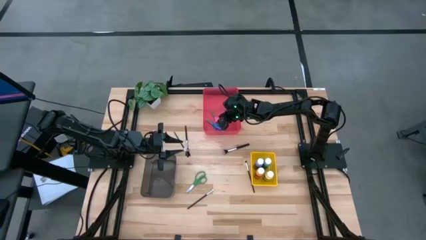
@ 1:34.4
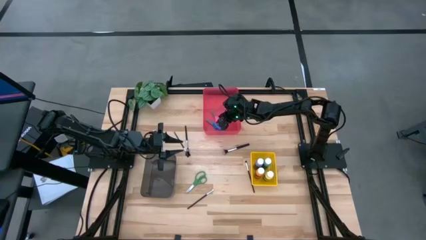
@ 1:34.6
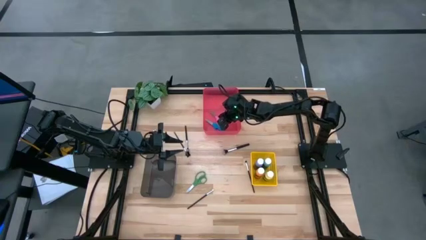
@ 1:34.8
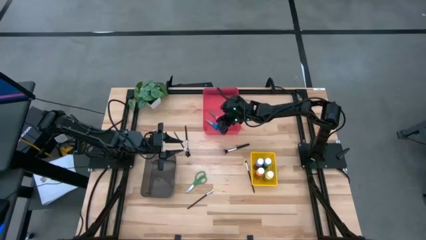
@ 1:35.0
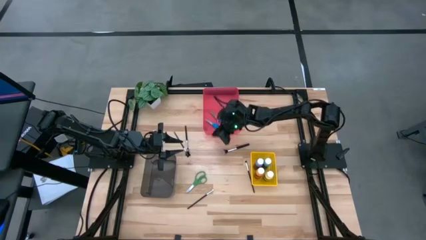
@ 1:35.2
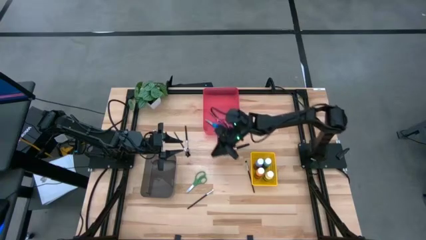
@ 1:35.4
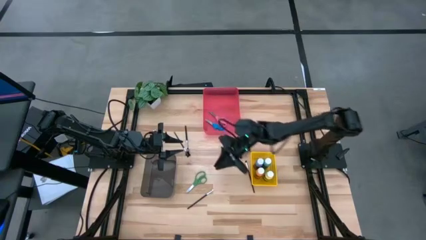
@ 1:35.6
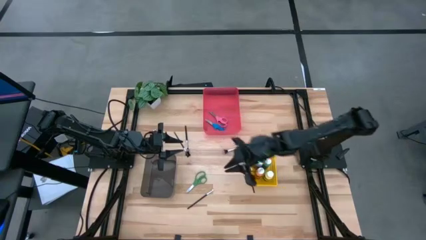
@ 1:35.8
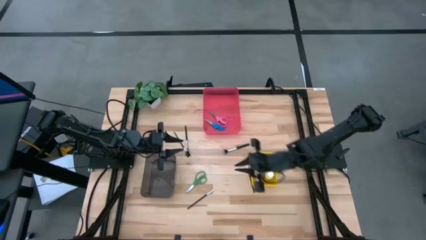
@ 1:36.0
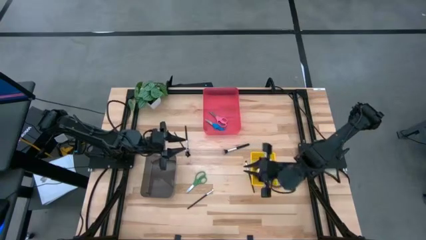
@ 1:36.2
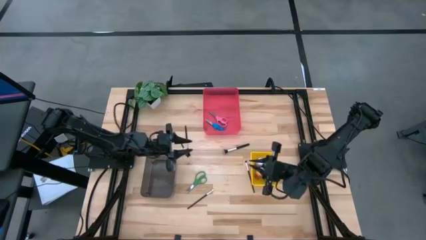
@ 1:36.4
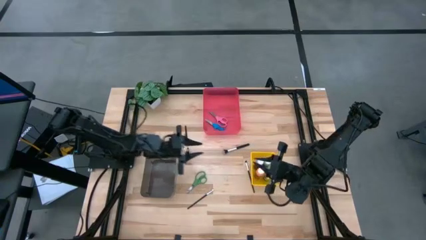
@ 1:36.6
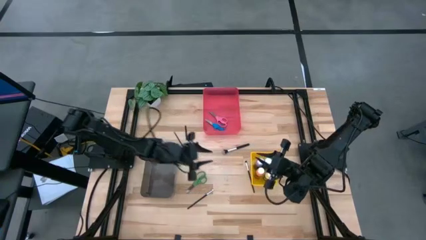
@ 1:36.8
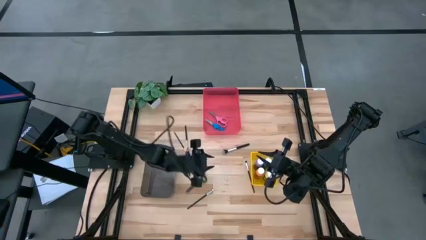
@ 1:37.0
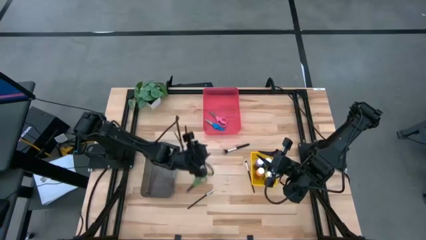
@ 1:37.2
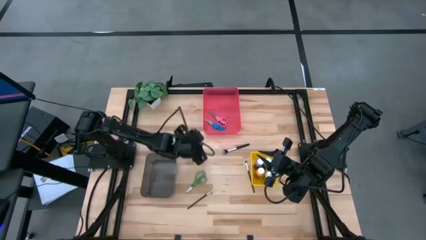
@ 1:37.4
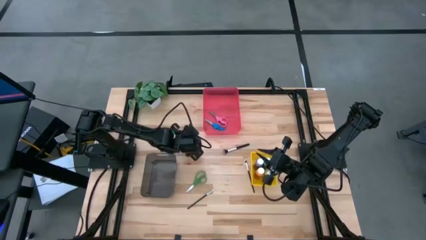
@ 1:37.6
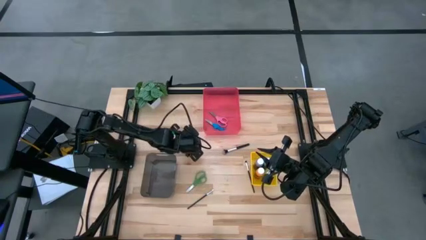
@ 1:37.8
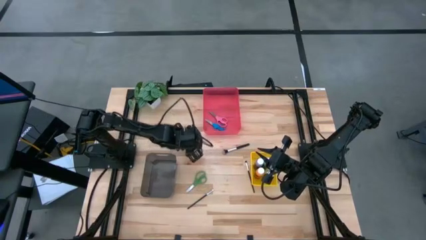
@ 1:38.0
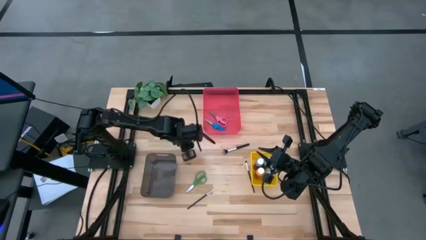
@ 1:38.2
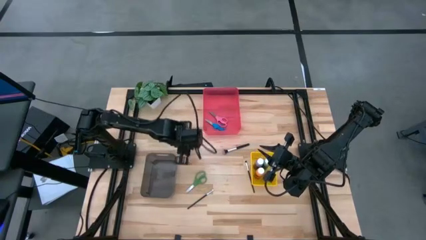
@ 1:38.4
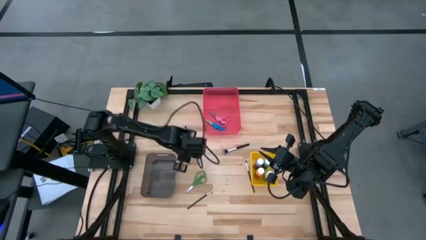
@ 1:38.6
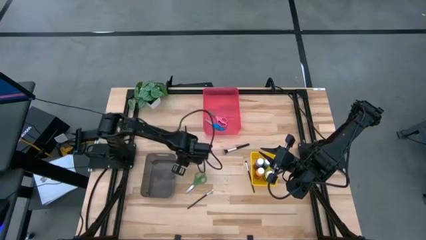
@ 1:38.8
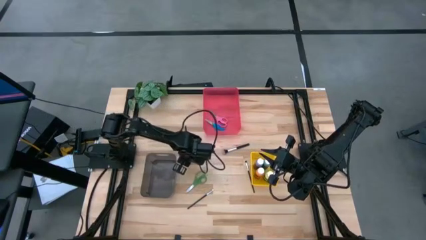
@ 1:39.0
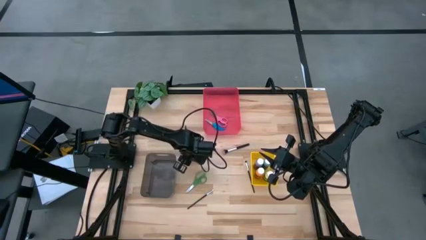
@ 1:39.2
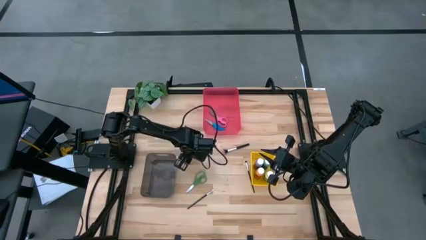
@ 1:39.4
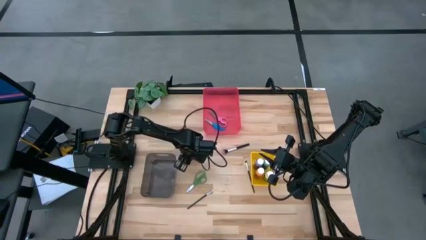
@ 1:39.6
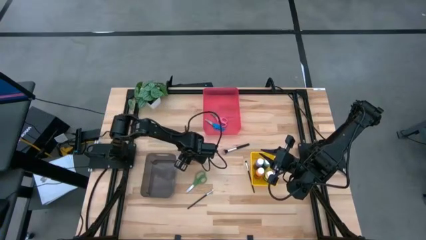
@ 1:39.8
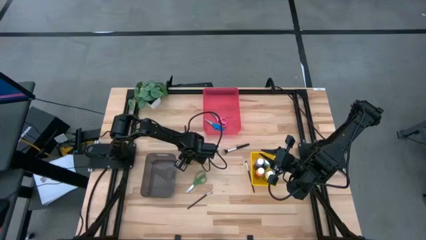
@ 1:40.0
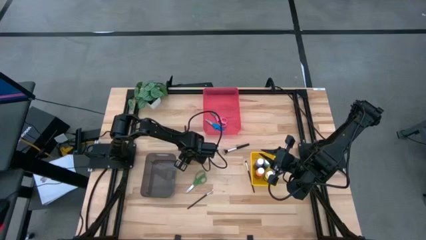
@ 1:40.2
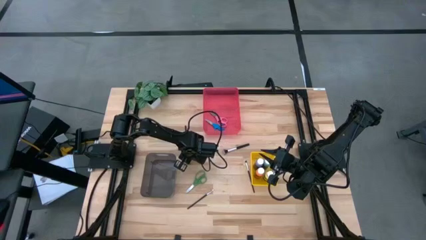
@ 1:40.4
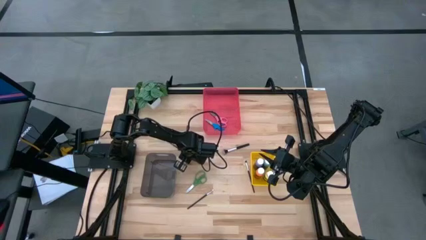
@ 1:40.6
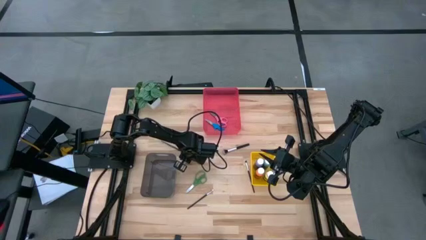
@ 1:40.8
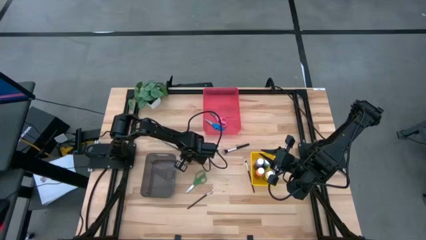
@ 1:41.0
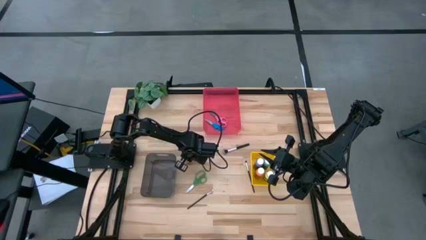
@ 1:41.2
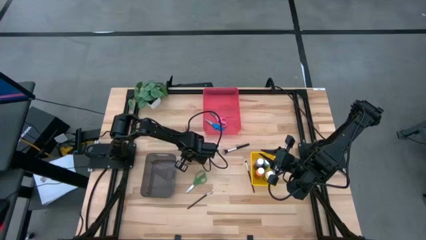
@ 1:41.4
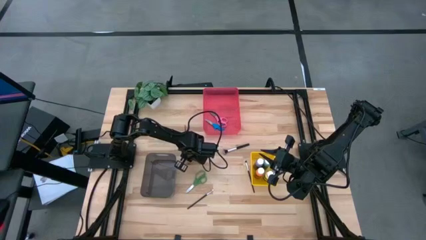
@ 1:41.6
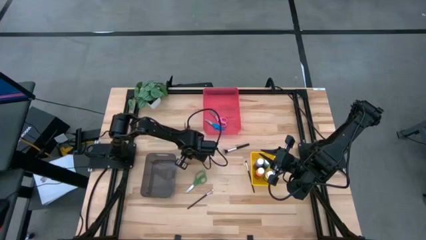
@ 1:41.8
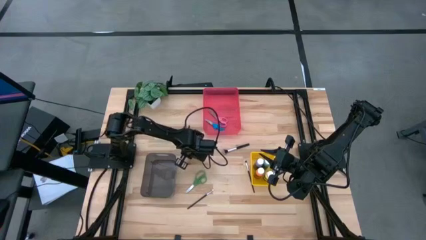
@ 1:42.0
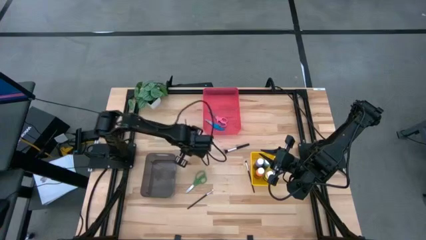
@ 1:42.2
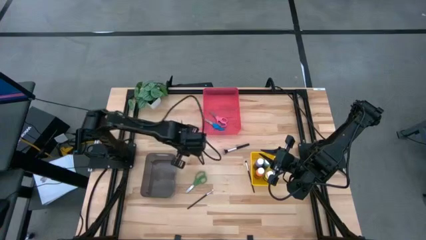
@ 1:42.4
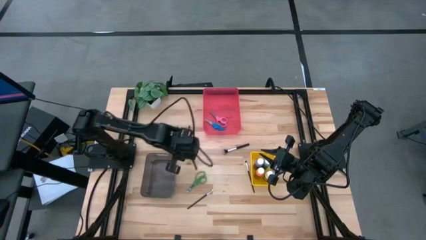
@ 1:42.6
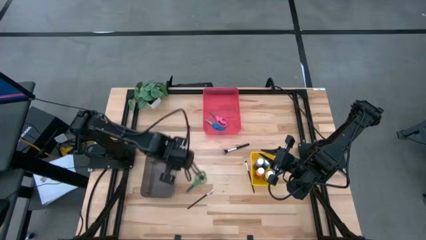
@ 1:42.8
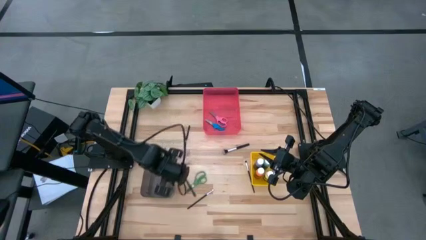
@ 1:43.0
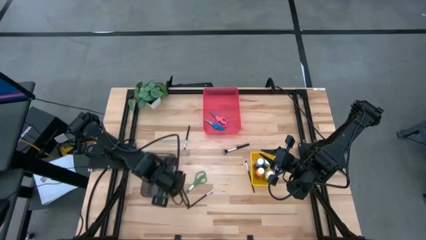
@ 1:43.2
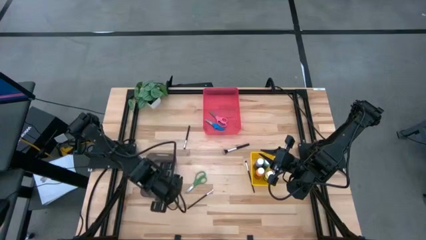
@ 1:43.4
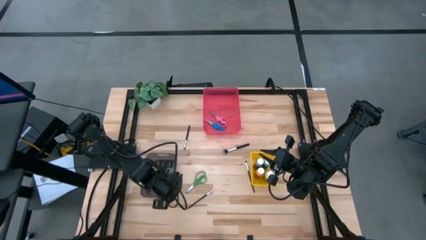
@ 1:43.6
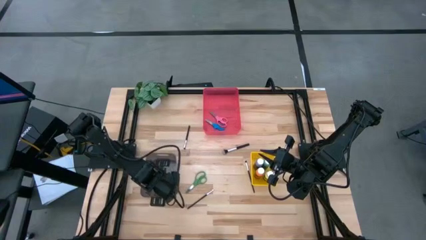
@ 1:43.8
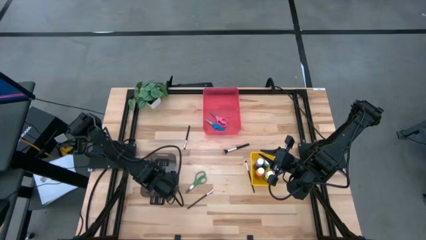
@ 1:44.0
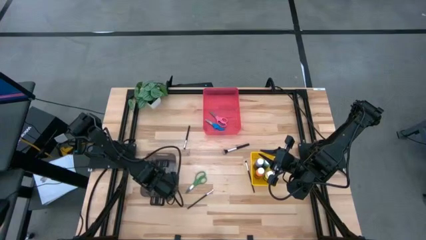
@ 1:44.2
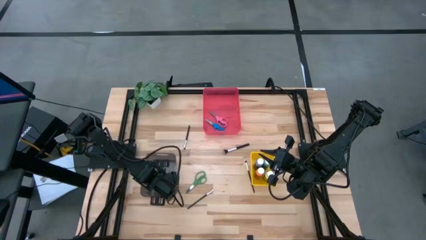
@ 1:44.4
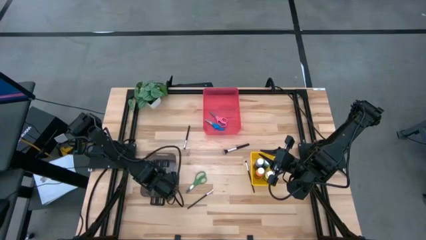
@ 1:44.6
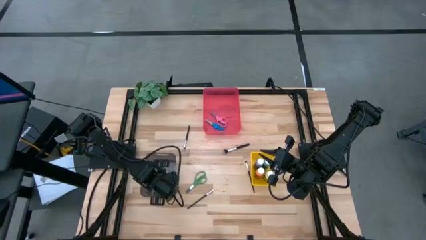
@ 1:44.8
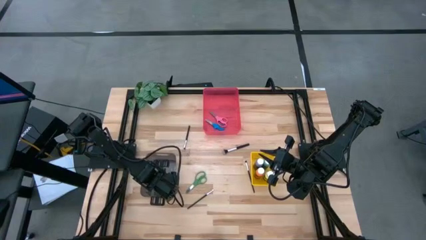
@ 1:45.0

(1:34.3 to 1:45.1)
Task: Pick & Place Paint Supplies
Put the black makeup brush into the black bin

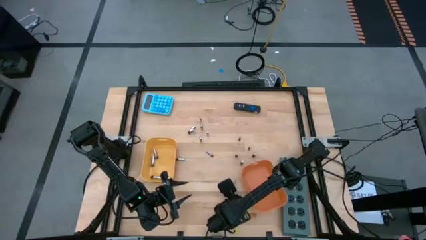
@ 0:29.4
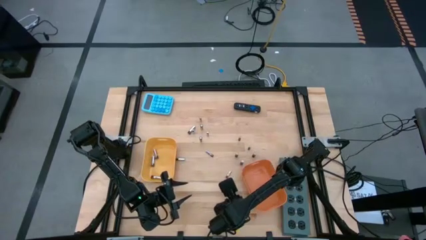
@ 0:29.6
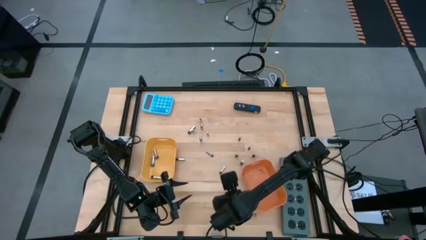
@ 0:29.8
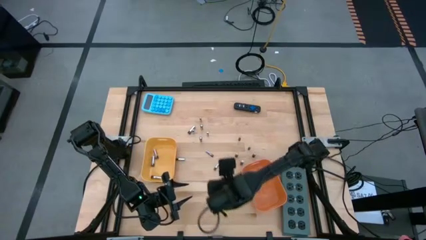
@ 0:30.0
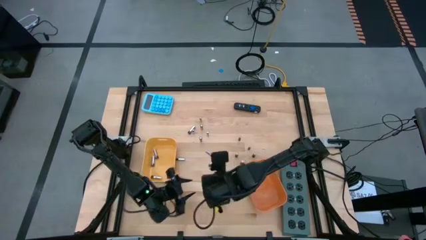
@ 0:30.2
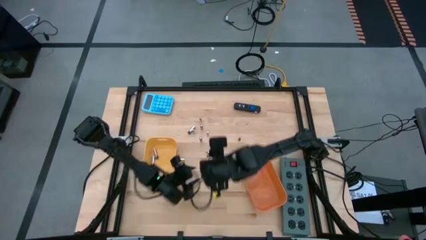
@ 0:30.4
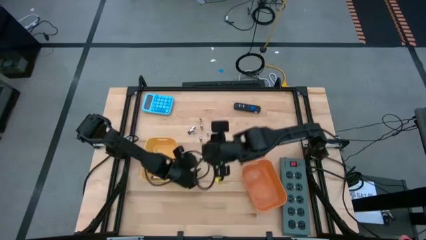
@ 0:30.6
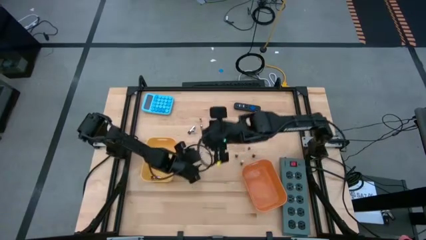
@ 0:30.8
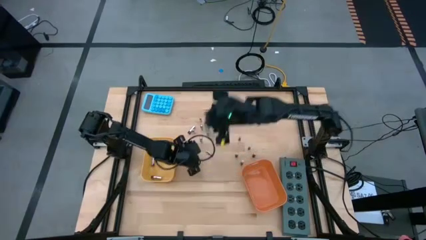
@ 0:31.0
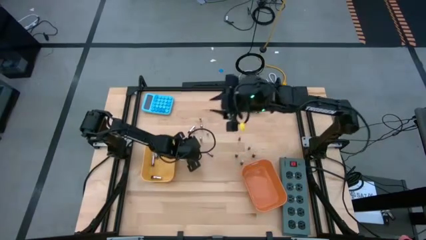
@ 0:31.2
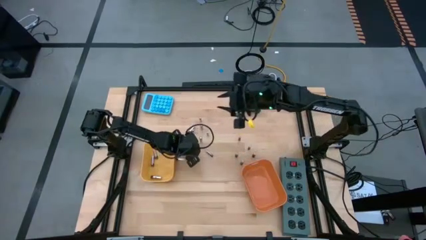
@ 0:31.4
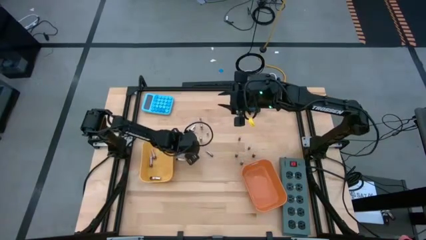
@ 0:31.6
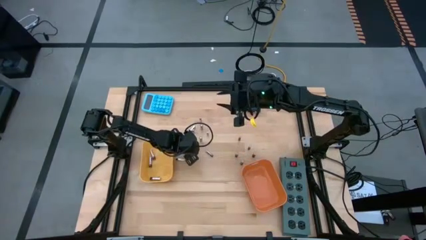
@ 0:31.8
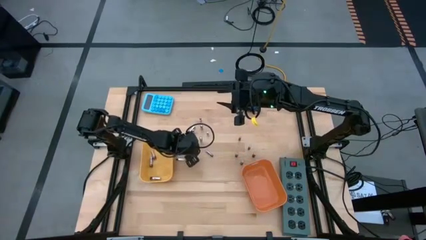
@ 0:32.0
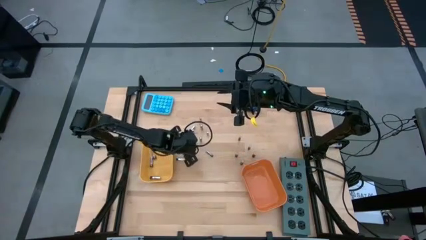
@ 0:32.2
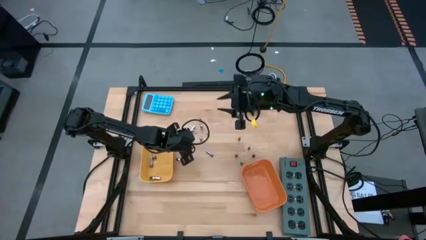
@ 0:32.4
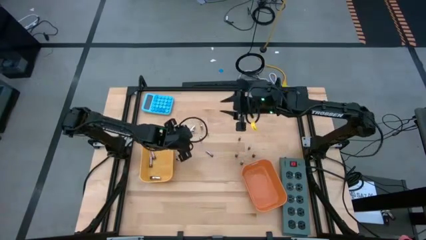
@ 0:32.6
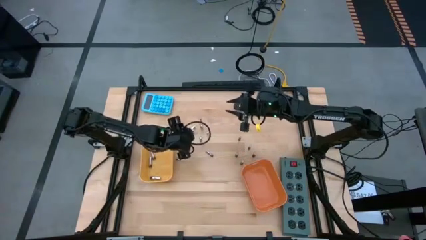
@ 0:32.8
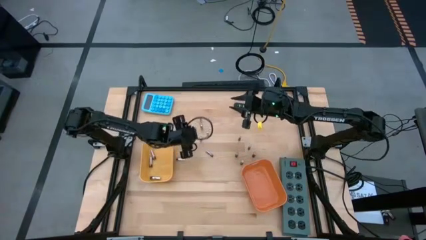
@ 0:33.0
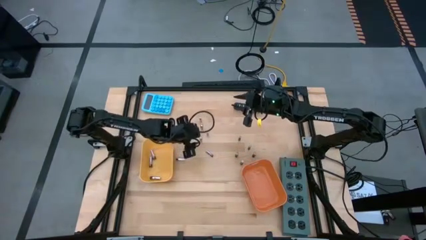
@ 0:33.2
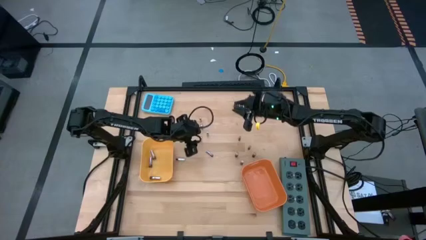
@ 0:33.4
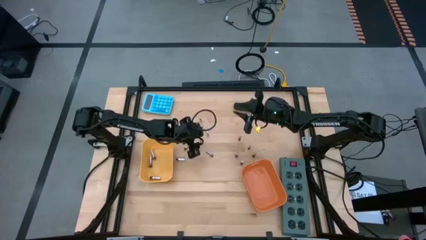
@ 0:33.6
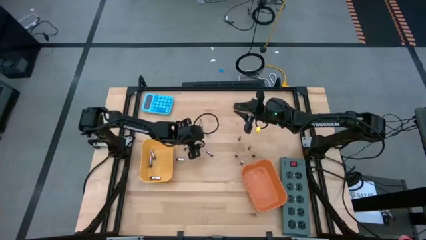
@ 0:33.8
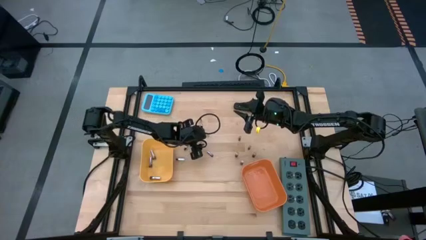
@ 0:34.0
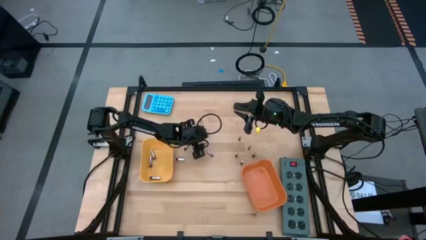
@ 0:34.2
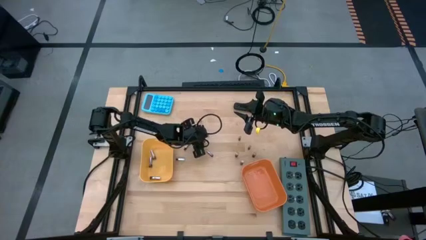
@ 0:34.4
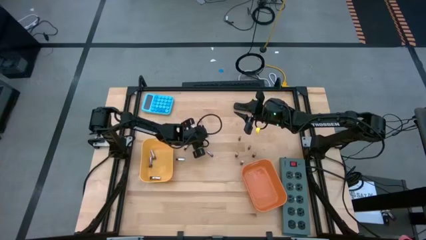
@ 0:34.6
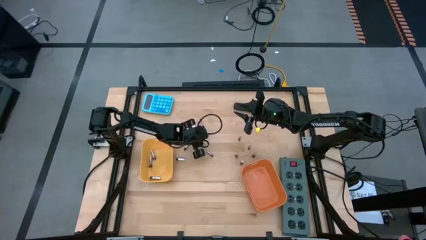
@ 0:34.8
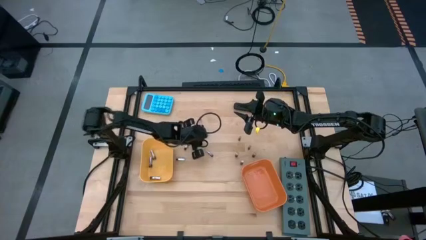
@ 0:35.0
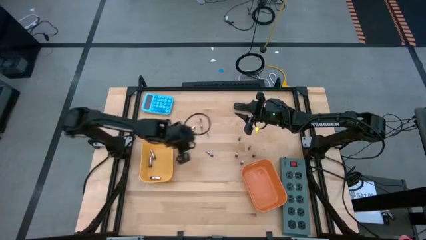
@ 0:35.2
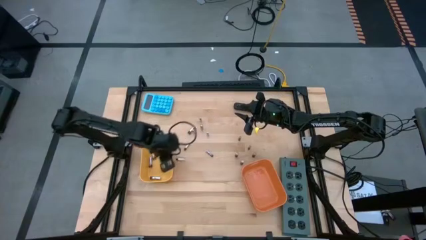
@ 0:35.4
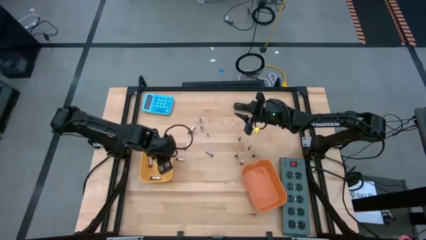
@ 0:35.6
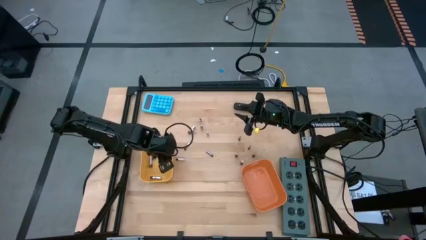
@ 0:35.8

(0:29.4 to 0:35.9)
Task: Sort batteries
Put the silver battery into the yellow bin

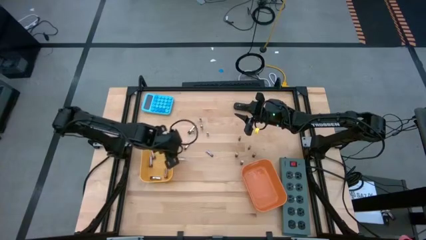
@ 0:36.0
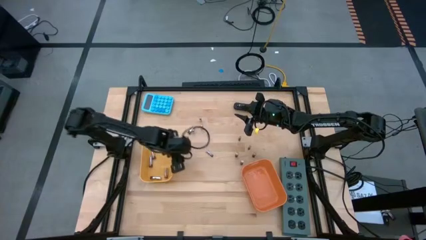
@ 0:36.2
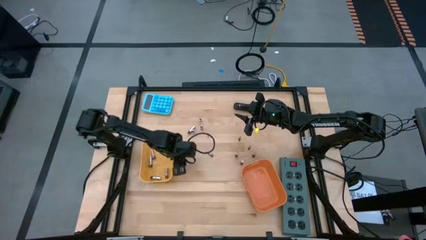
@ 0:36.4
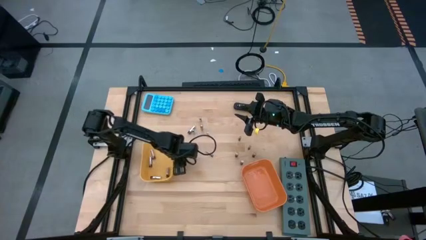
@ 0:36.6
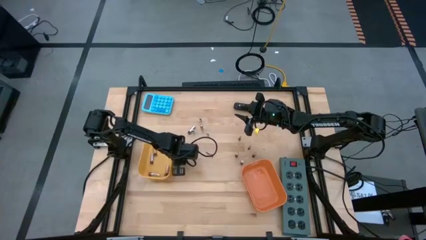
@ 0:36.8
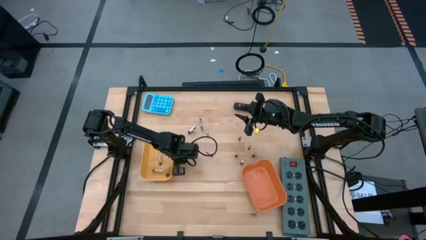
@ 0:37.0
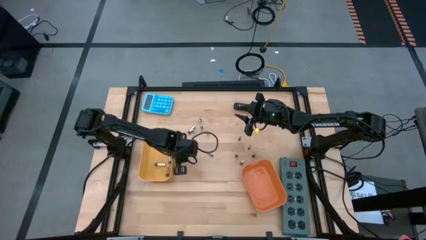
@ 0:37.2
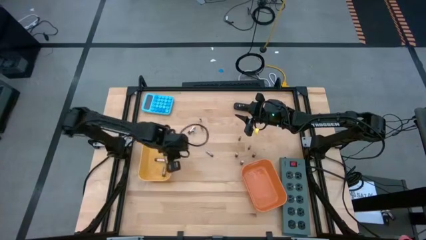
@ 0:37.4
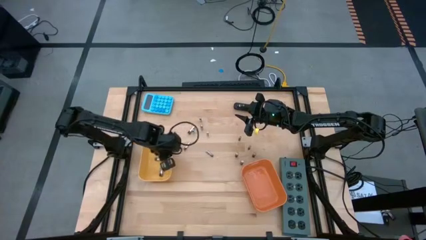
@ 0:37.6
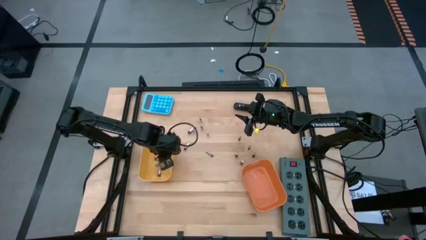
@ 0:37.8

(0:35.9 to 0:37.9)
Put the silver battery into the yellow bin
